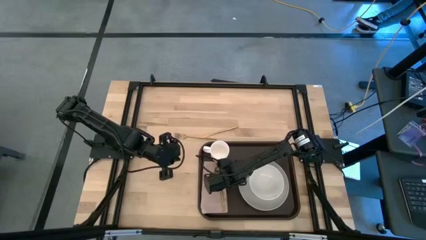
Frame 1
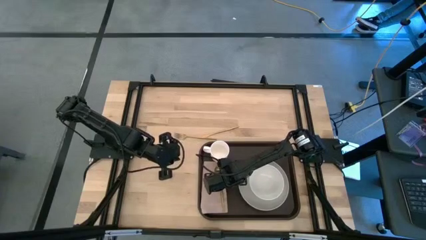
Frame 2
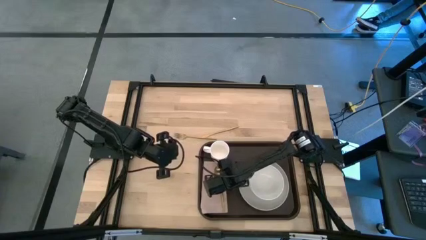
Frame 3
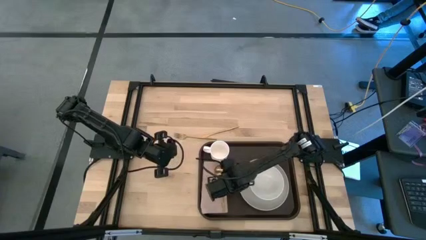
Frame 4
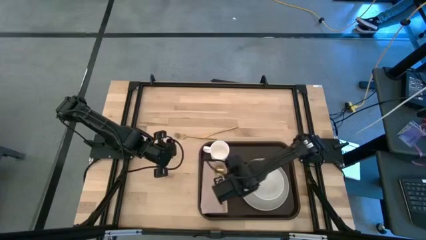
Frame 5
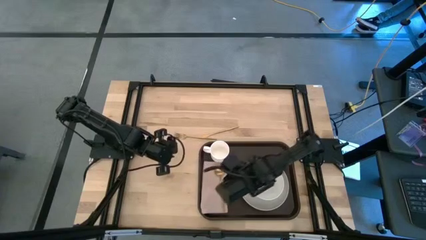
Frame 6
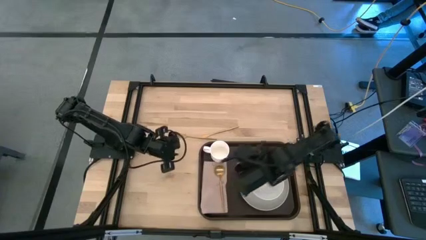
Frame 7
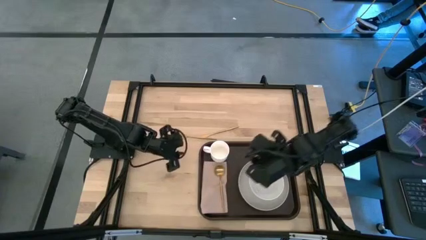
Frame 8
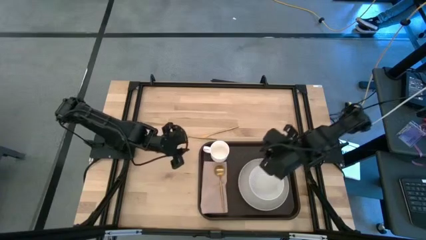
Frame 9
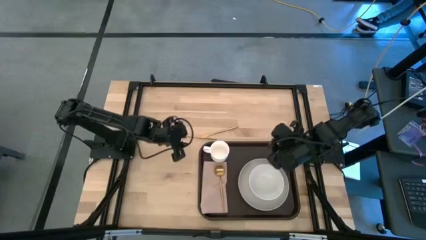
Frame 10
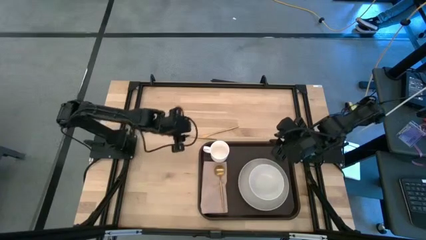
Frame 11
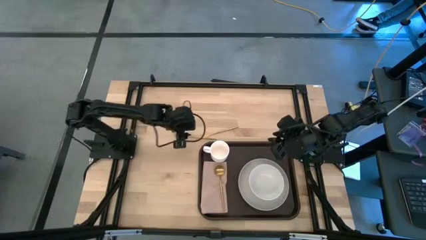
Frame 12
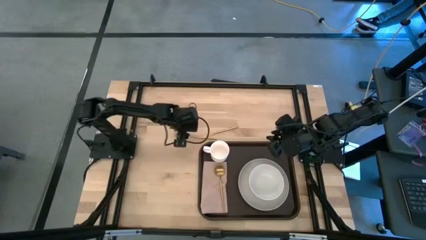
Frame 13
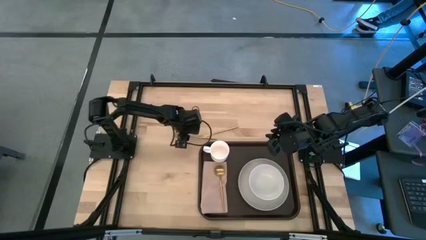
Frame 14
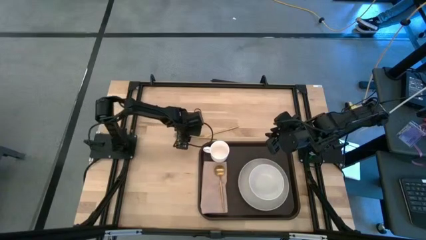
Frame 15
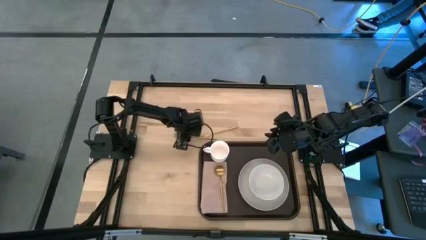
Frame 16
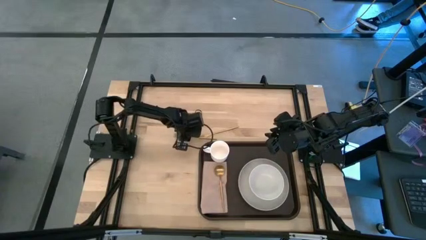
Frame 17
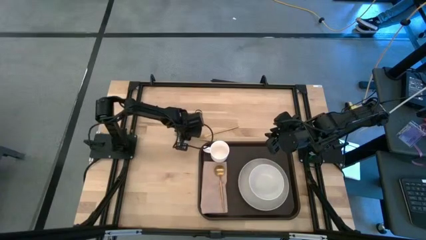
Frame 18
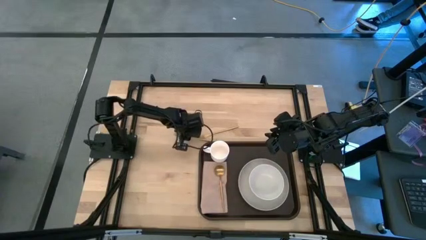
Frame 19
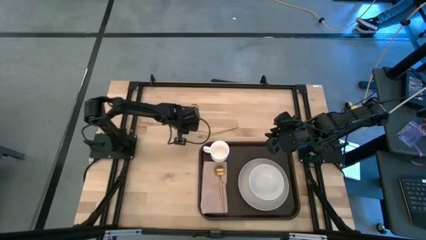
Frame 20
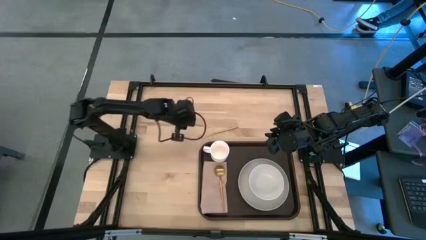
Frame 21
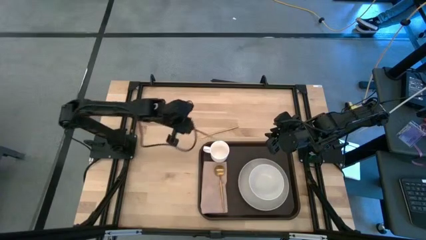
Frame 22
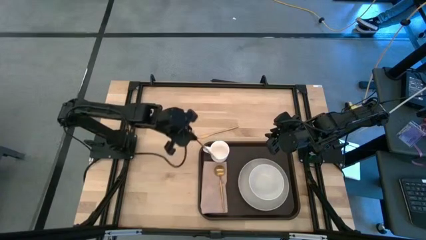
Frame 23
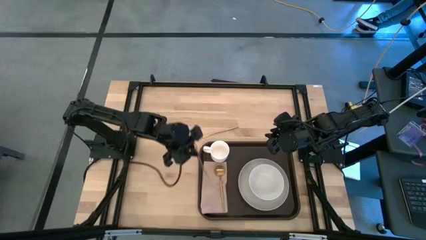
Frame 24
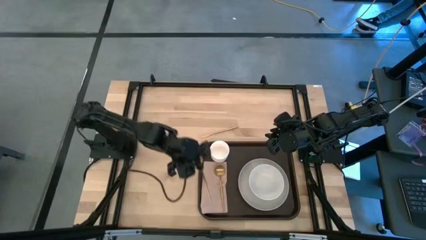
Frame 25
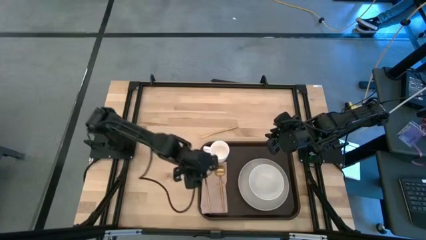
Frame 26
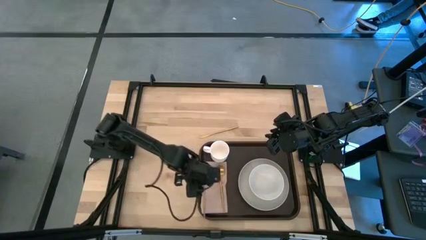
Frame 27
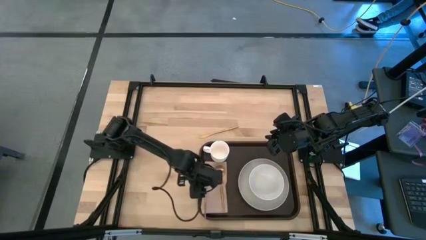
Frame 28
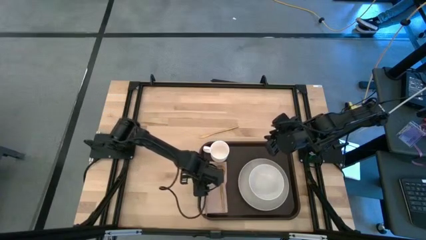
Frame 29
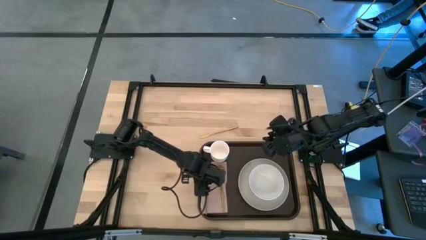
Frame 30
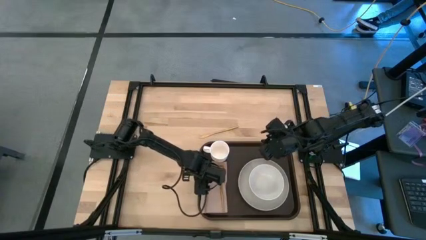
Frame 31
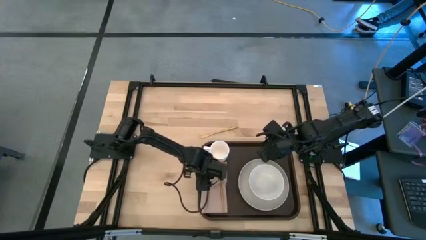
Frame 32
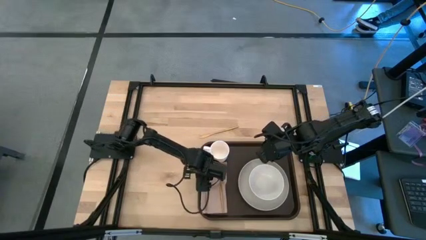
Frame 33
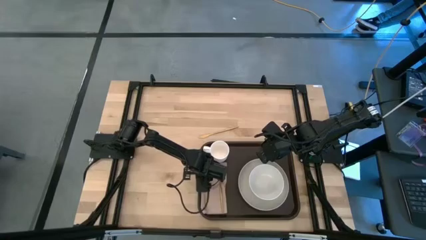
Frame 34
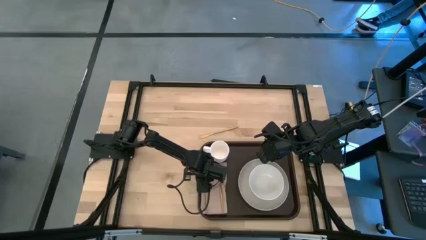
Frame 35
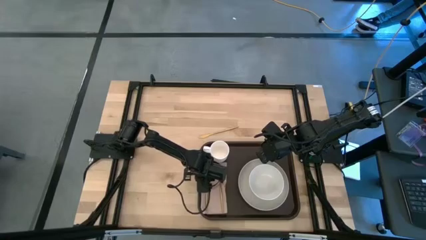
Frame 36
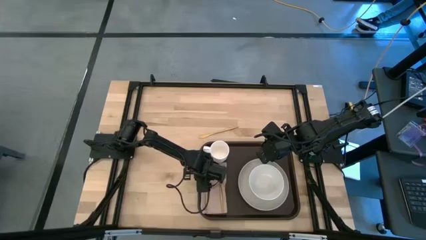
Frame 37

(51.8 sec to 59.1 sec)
Task: Set up tray
Put the gold fork on the brown napkin to the left of the gold spoon

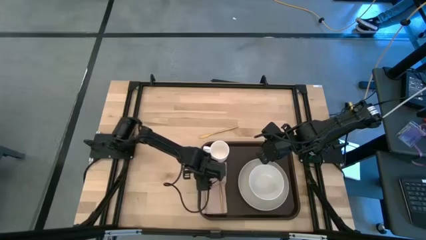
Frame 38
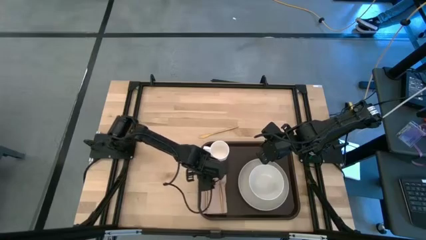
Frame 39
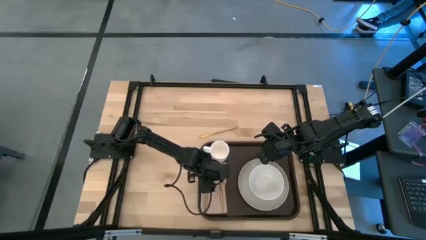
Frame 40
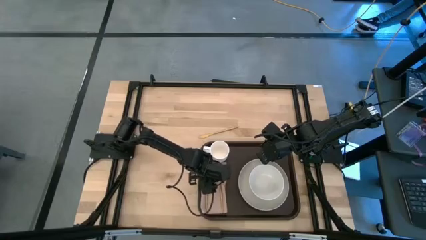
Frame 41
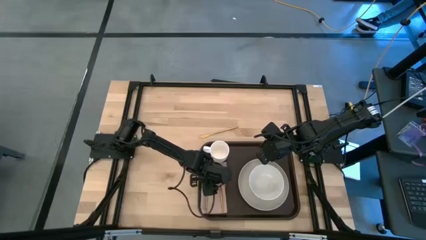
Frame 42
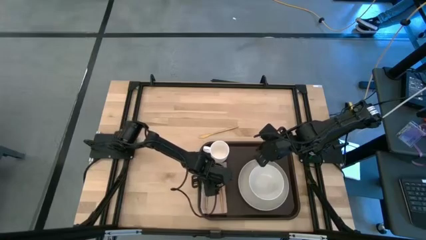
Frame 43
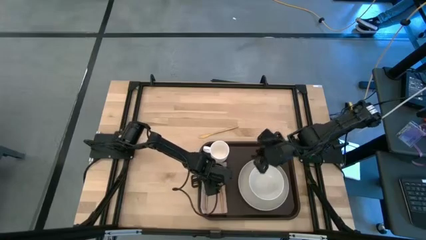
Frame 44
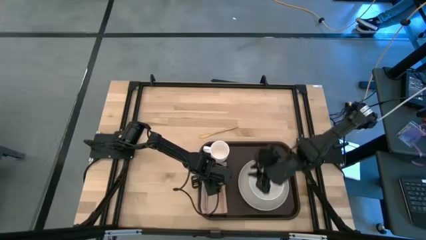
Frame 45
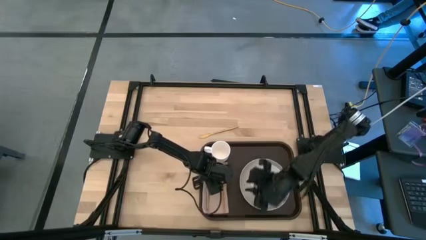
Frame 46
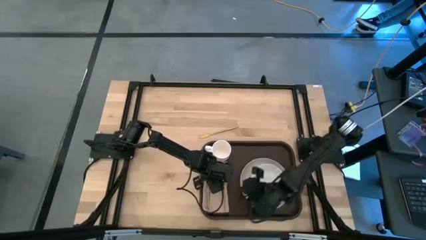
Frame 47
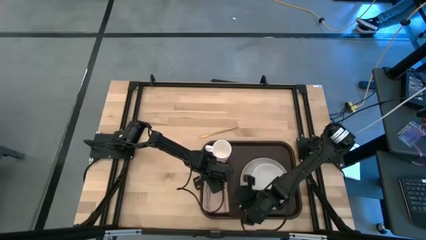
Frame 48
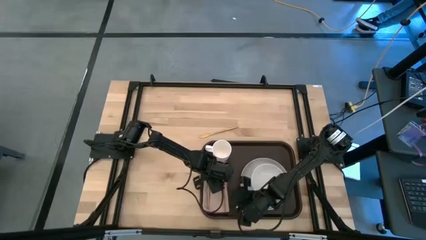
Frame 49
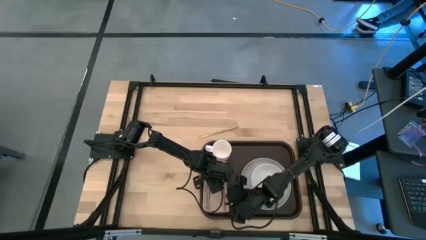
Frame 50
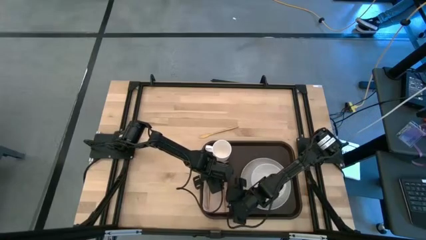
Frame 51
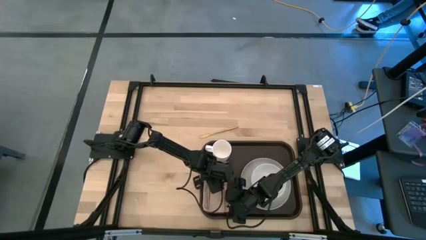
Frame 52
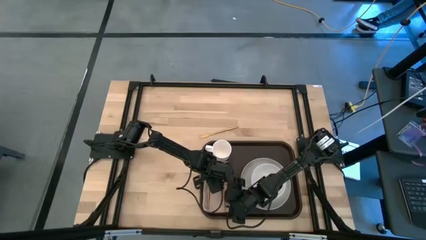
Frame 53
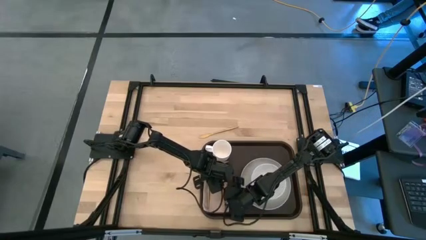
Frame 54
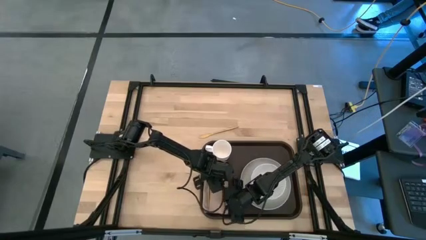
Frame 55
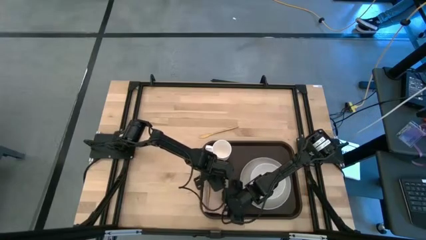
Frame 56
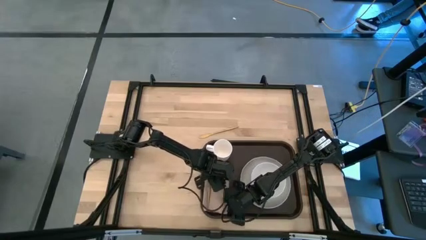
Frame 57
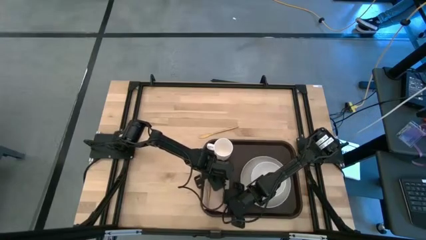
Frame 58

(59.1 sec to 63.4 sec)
Adjust the brown napkin

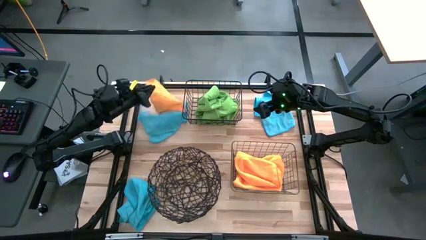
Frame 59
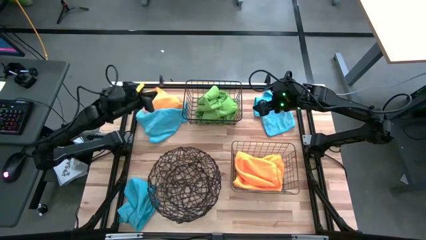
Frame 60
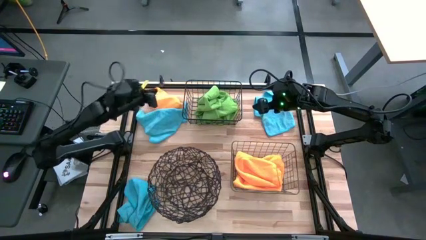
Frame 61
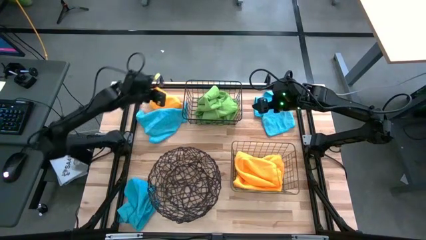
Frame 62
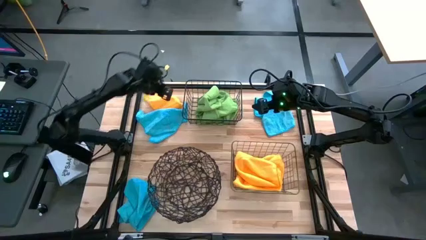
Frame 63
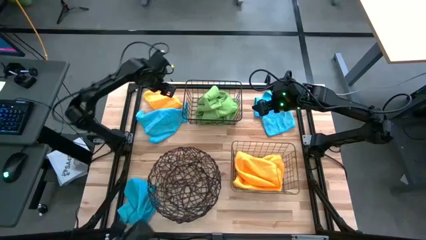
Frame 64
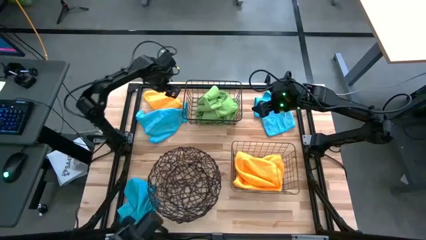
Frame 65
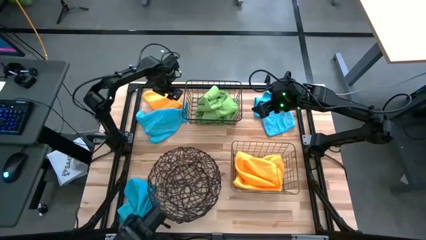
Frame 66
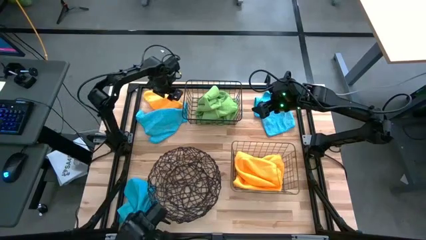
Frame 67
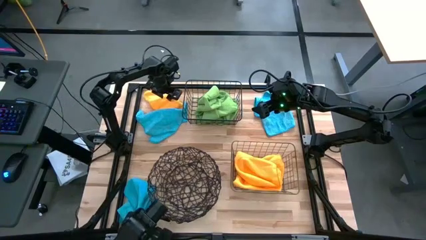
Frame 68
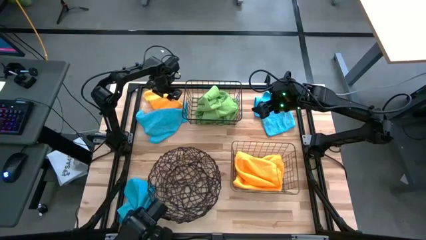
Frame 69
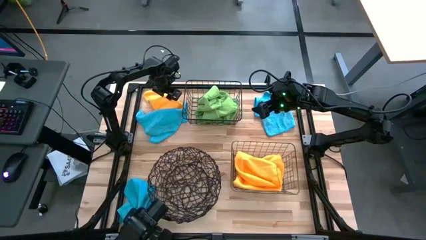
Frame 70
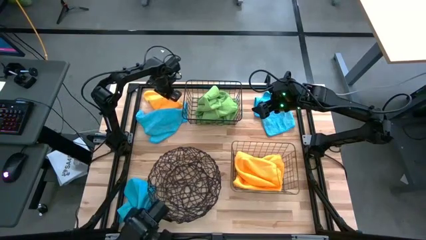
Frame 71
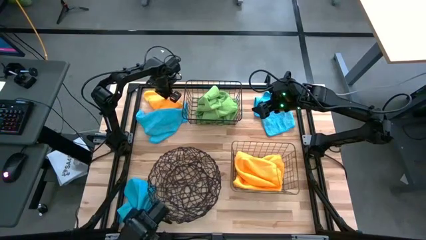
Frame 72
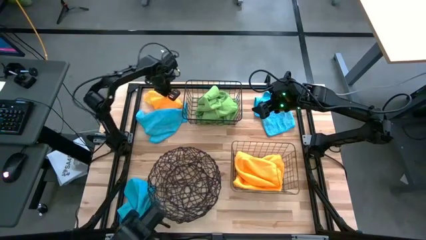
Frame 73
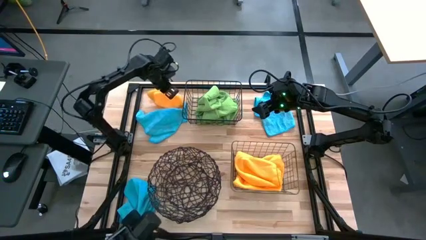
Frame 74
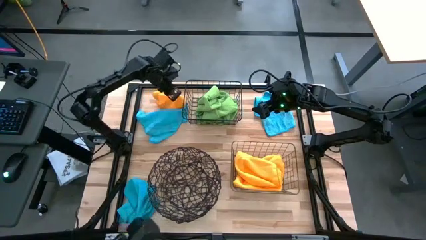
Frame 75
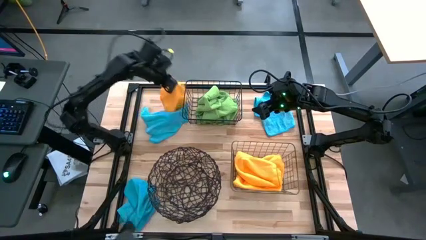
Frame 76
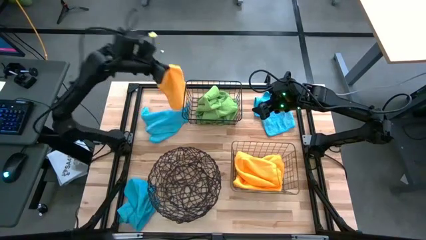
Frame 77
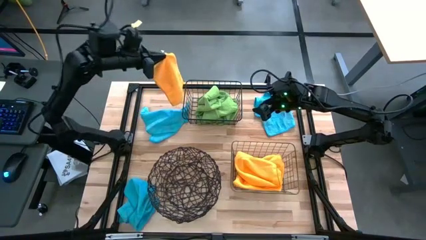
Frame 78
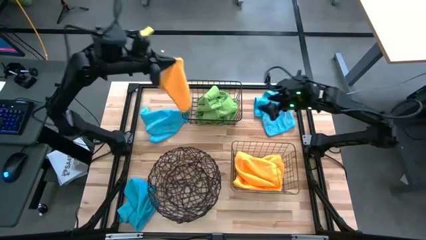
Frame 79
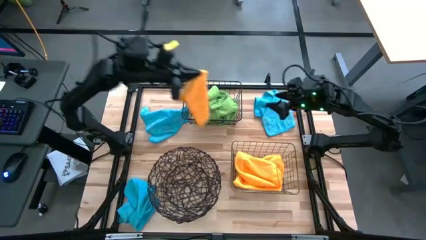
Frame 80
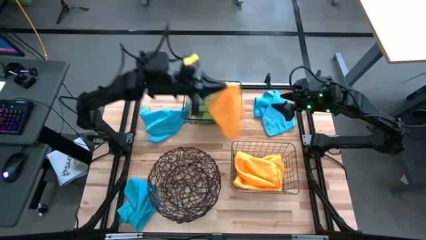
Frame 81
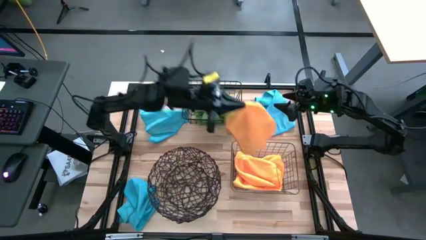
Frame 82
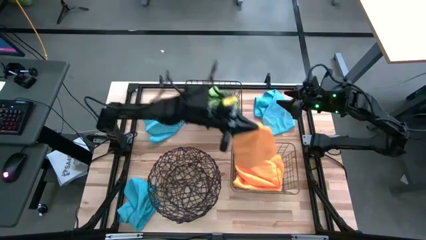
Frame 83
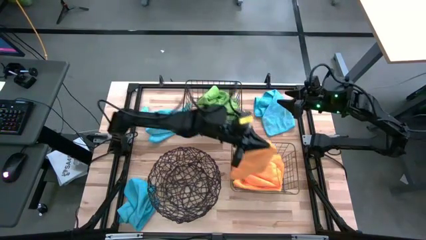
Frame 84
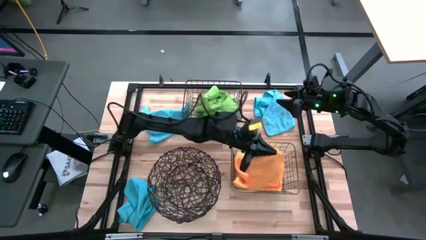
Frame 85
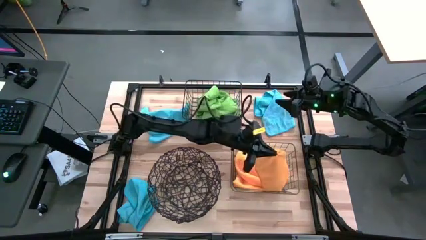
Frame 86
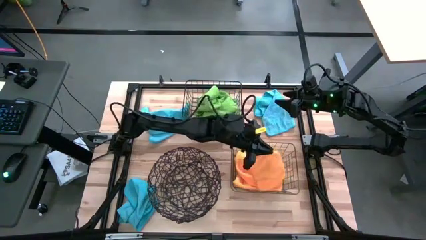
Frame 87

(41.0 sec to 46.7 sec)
Task: Sort microfiber towel by color & place in baskets
Put the orange towel into the gold wire basket
